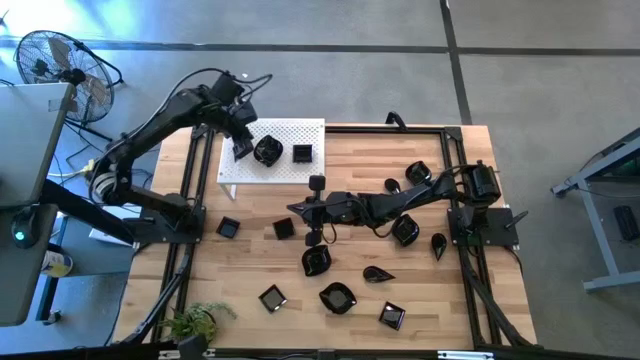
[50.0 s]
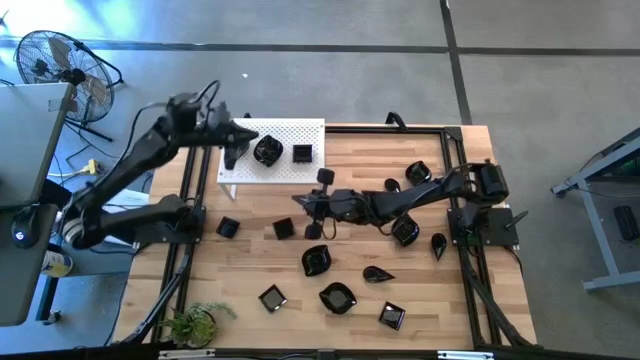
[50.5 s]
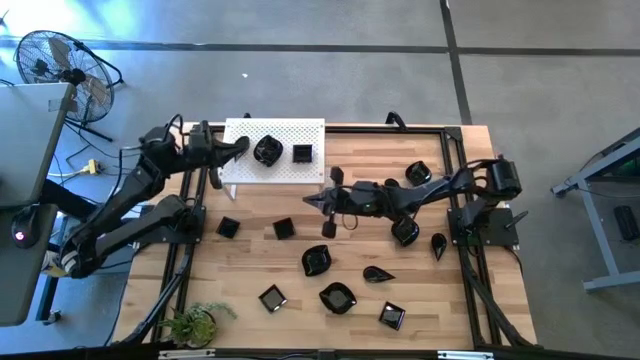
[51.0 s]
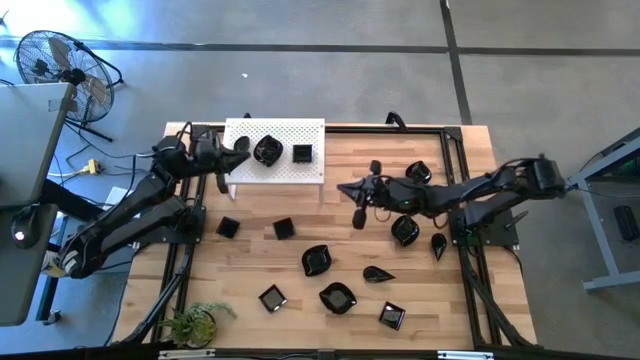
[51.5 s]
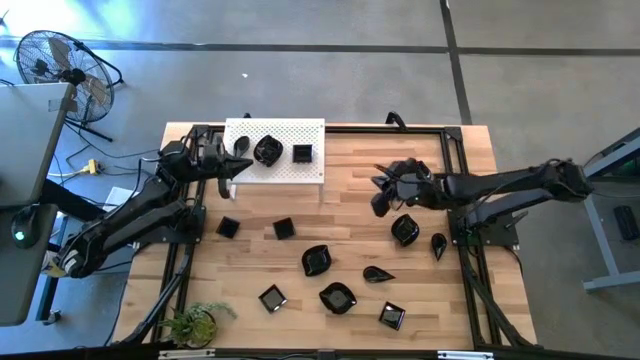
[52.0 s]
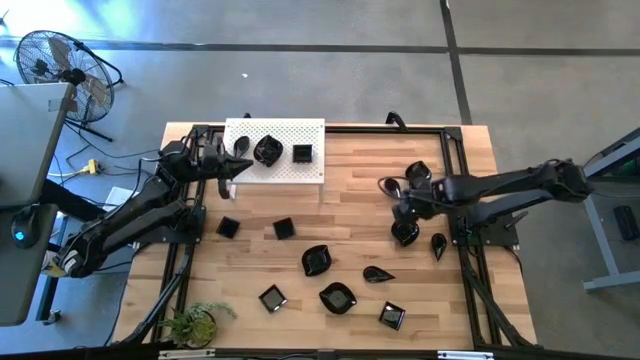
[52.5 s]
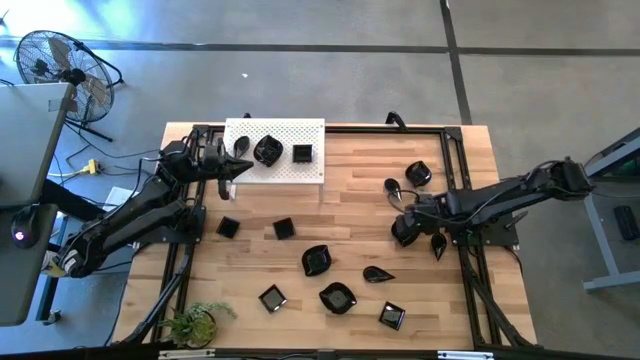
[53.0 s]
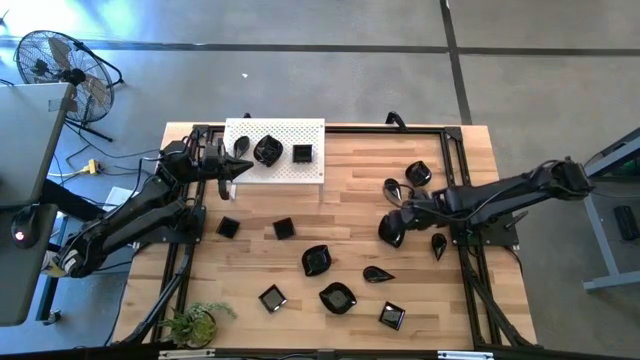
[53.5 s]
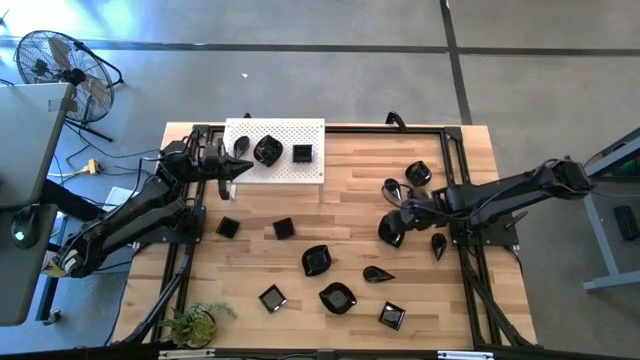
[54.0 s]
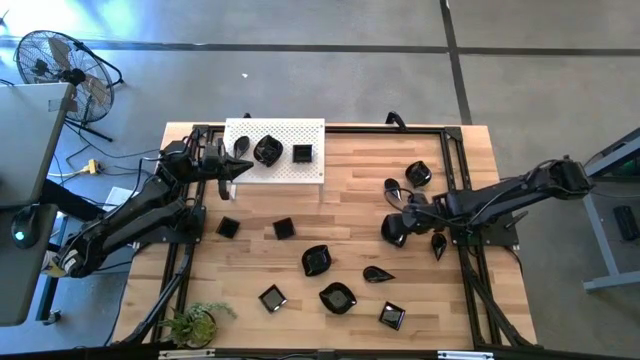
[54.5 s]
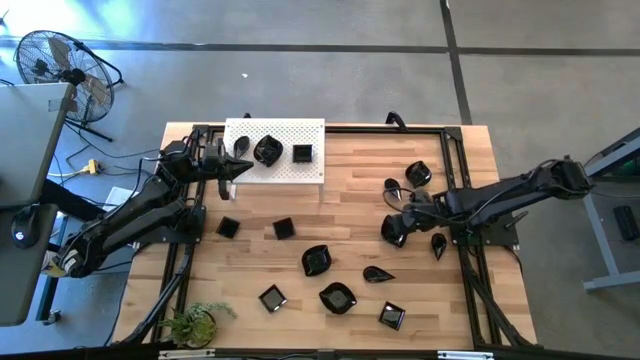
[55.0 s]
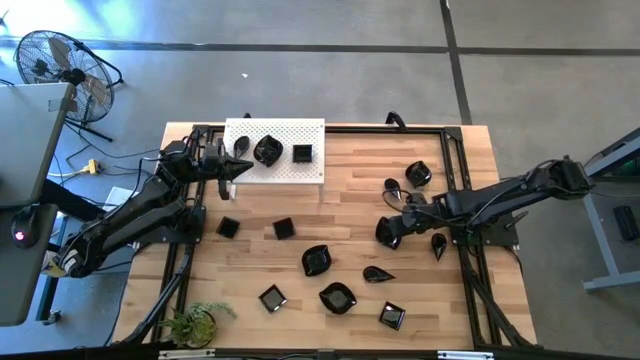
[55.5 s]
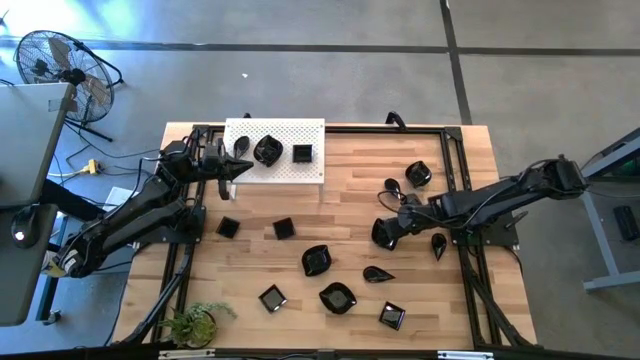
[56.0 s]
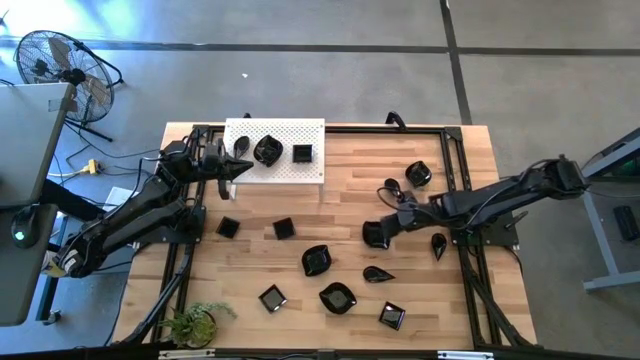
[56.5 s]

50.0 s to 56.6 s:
Task: Pick & Place Mini shaped plates
Stack the leaf-shaped plate on top of the leaf-shaped plate on the shelf

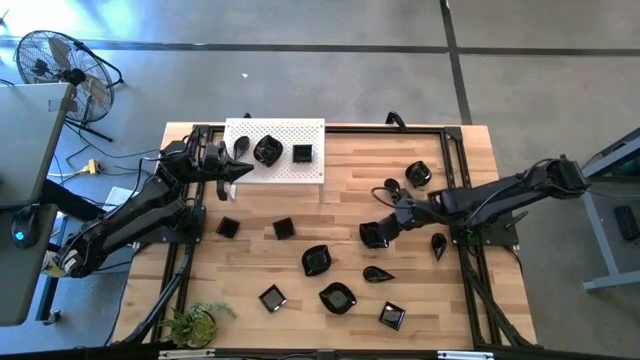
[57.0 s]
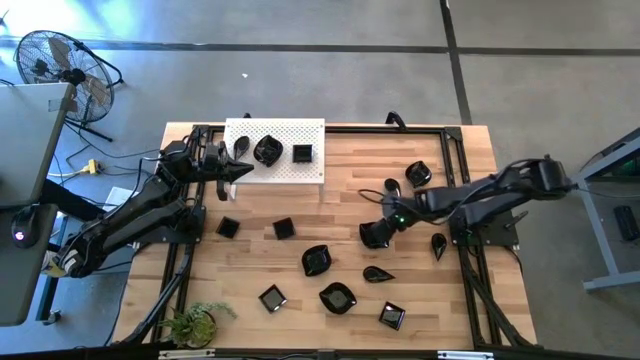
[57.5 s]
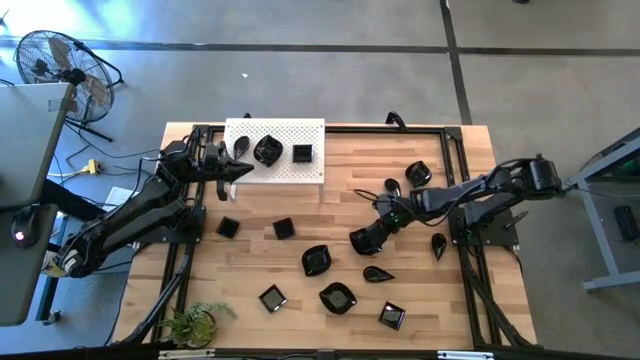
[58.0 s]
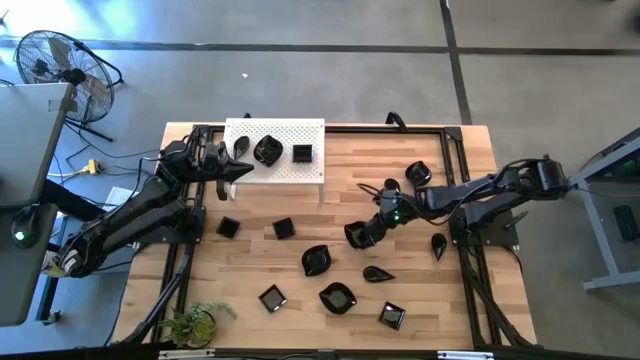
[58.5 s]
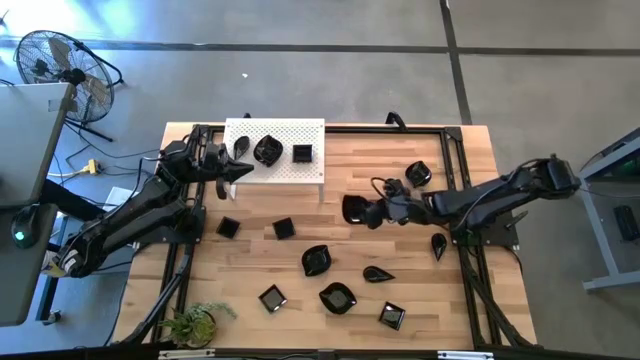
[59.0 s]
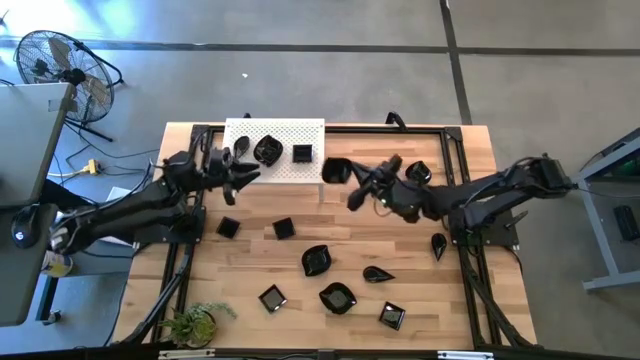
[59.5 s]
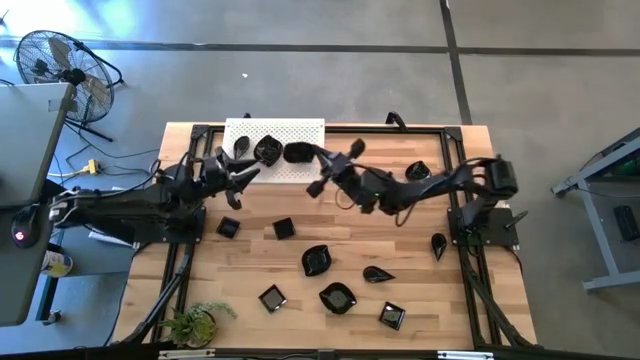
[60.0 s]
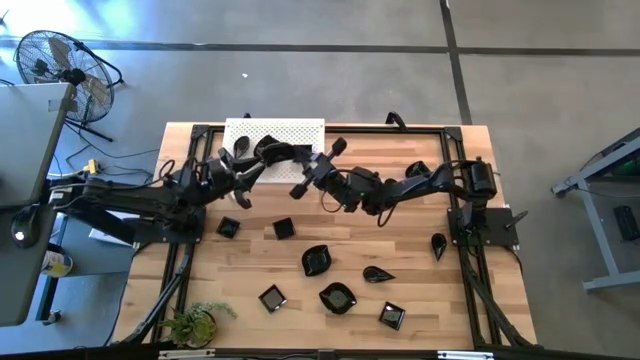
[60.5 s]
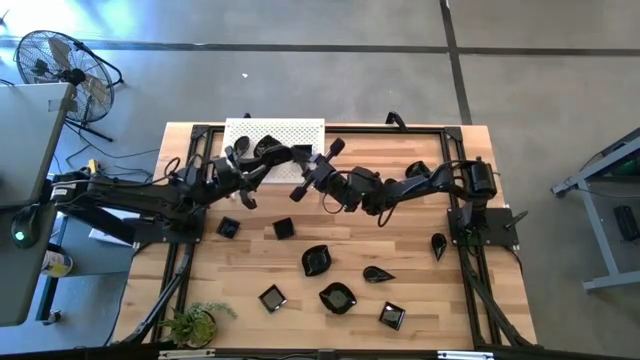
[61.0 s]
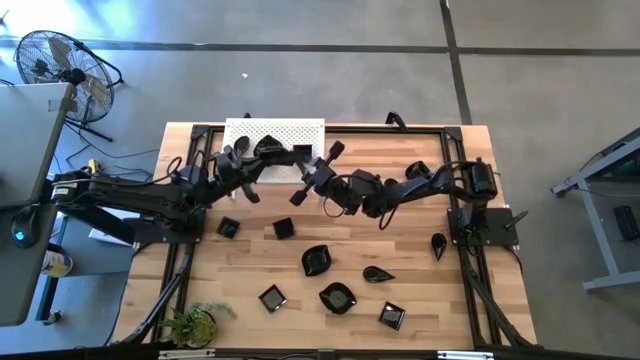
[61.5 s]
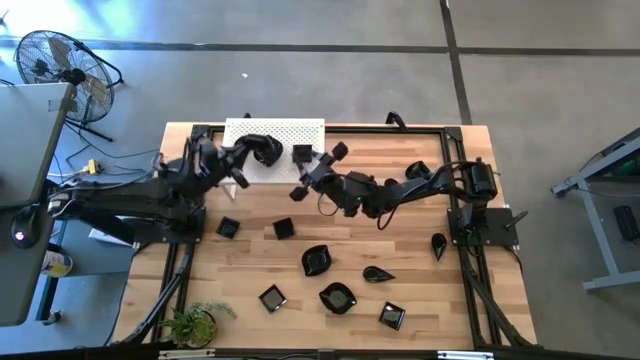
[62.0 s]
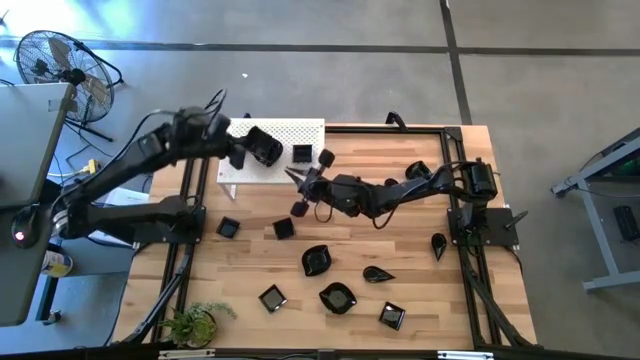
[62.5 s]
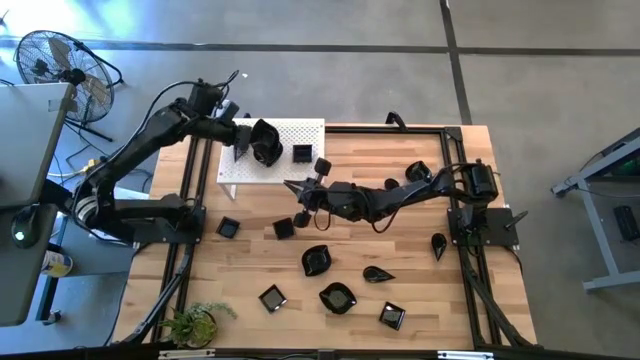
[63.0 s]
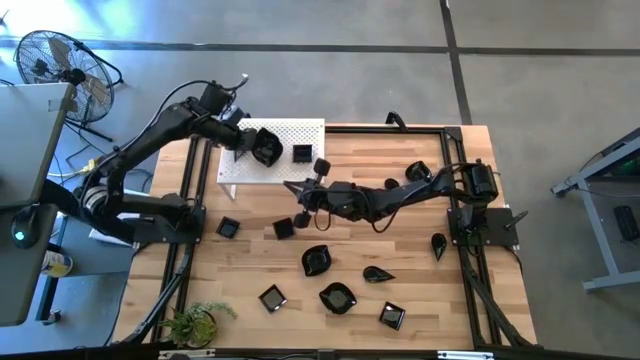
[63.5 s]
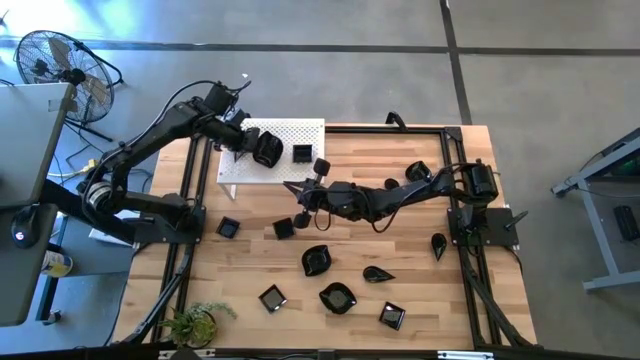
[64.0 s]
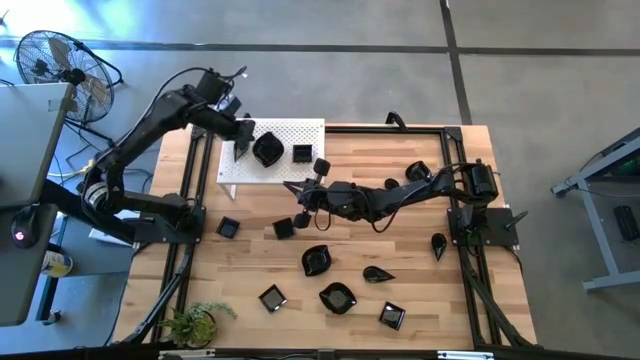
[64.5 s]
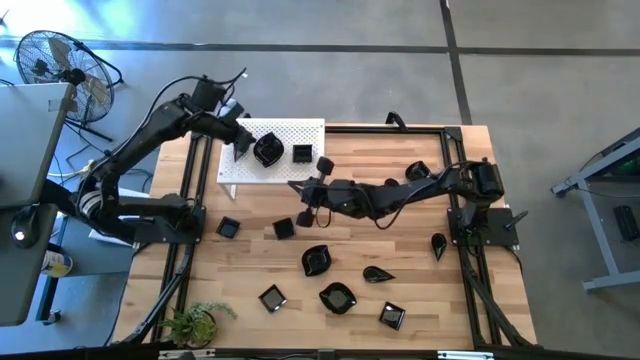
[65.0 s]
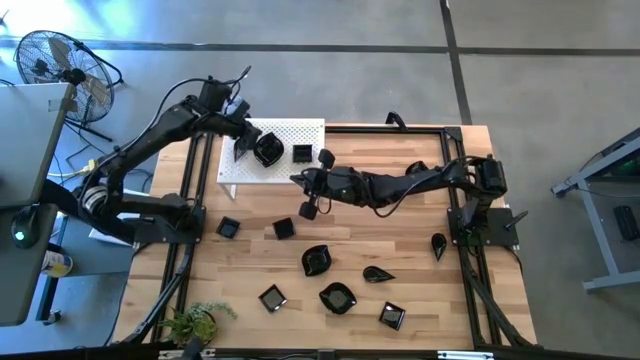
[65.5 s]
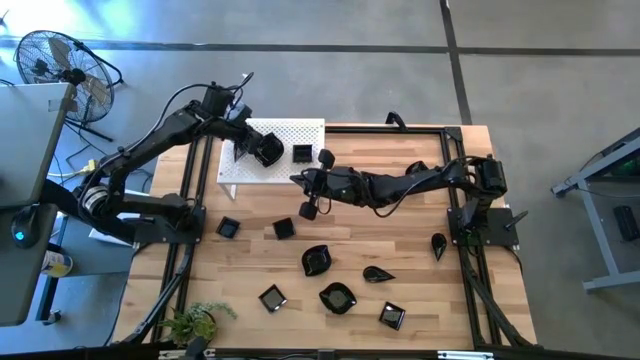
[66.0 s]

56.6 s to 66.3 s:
Stack the leaf-shaped plate on top of the leaf-shaped plate on the shelf

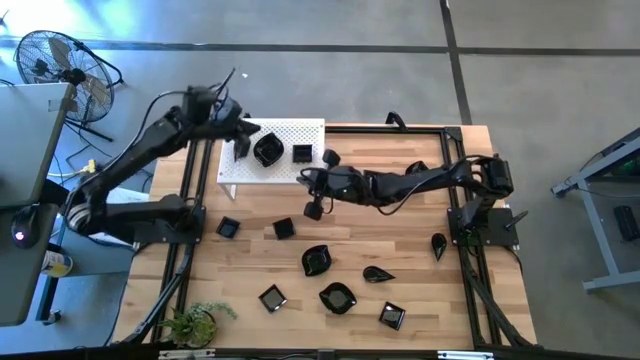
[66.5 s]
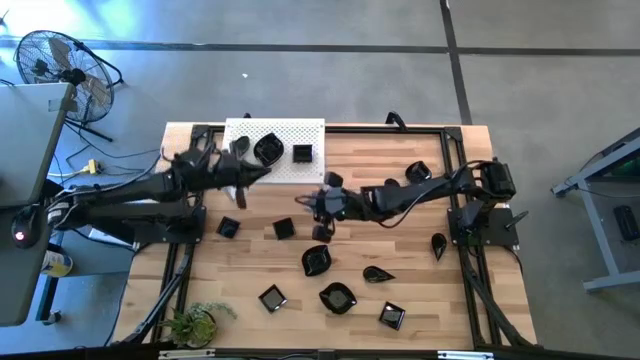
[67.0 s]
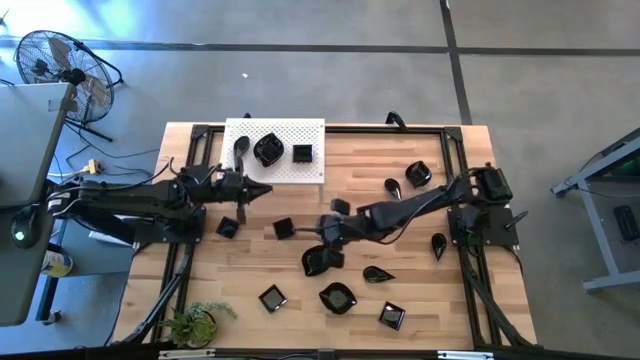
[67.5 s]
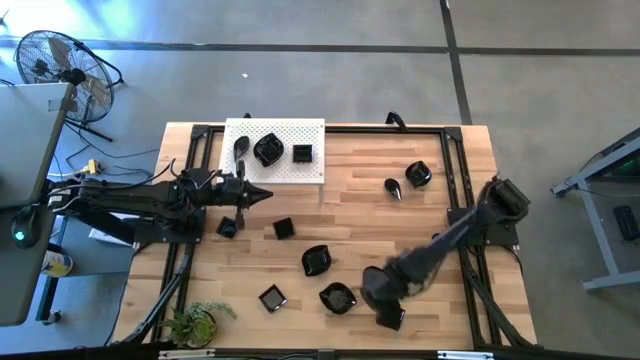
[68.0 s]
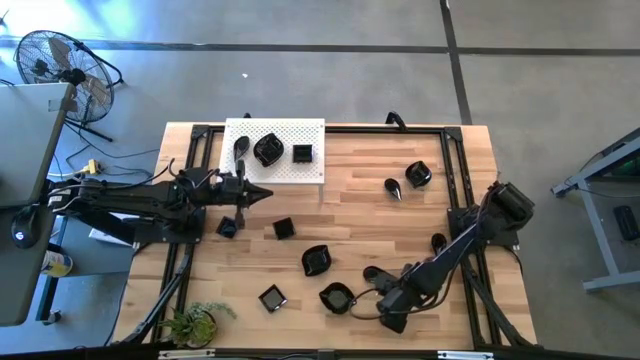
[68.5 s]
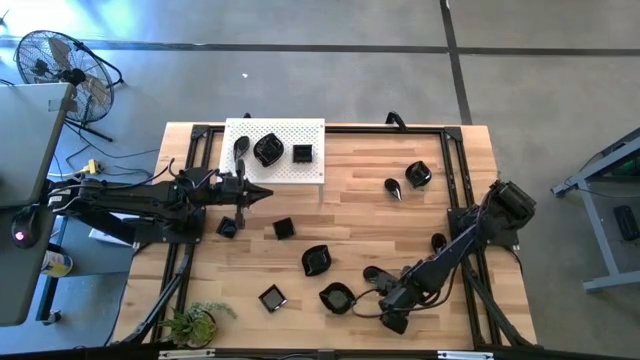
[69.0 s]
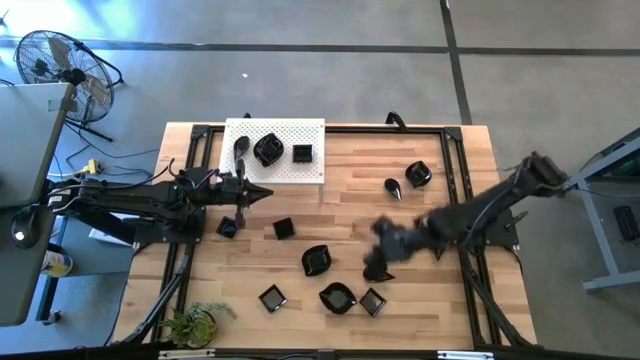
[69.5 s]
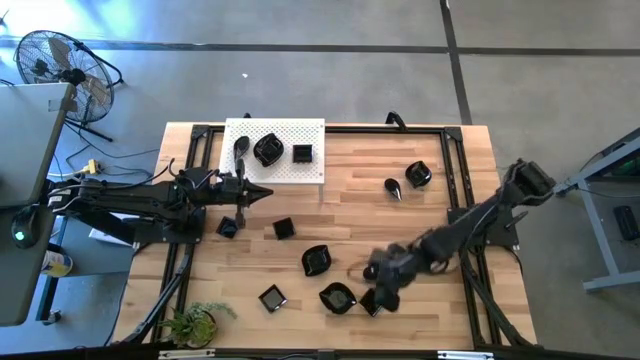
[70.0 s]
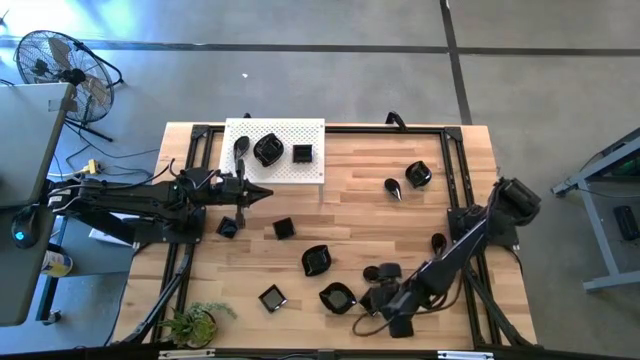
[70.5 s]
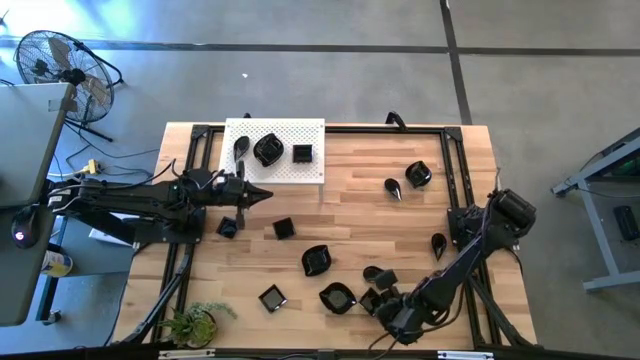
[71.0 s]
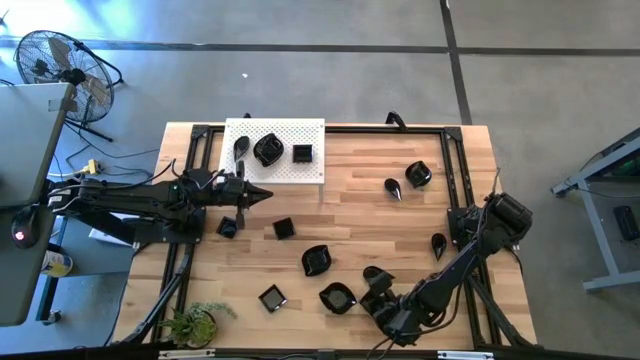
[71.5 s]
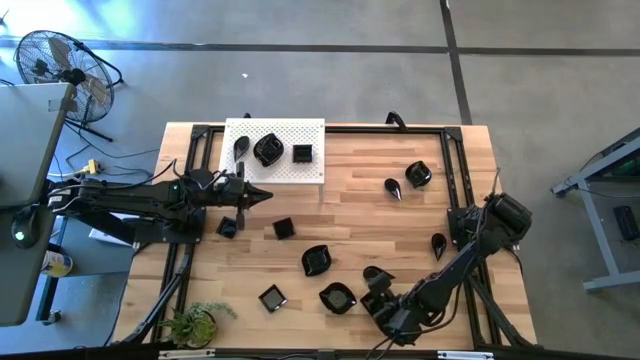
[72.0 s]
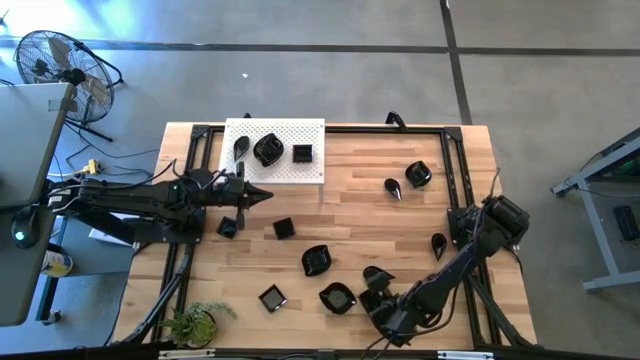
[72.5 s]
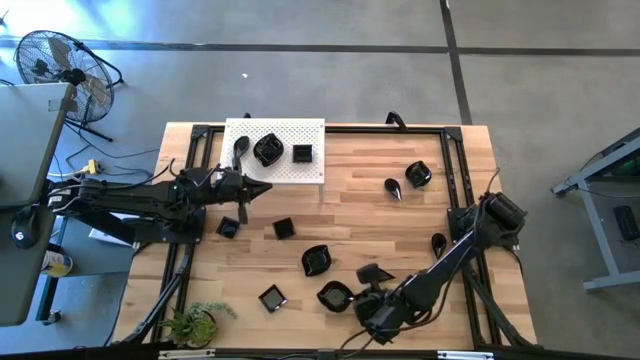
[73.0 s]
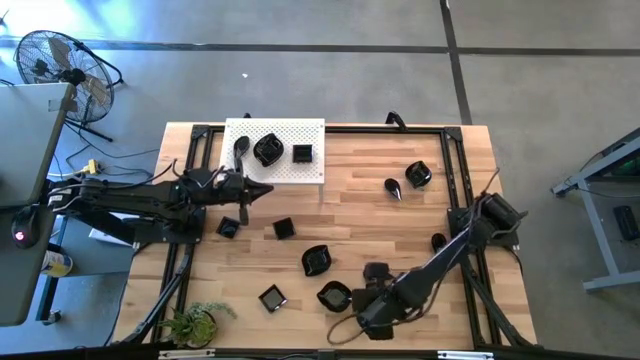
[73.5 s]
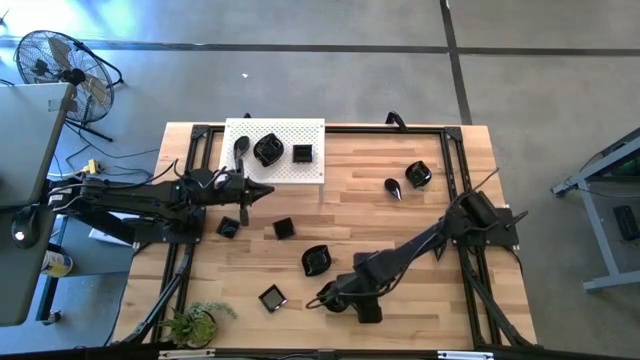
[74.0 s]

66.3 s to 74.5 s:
Stack the square plate on top of the square plate on the shelf
